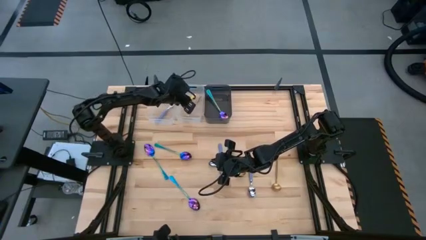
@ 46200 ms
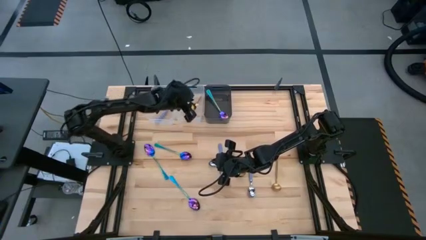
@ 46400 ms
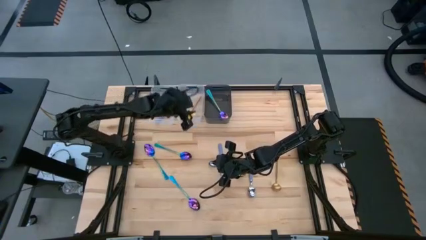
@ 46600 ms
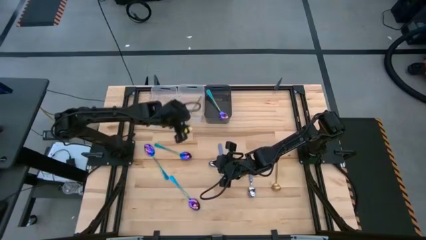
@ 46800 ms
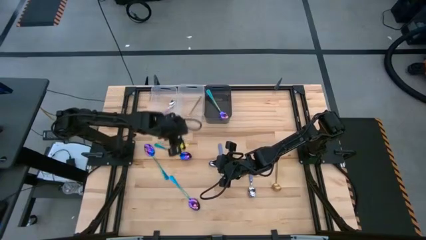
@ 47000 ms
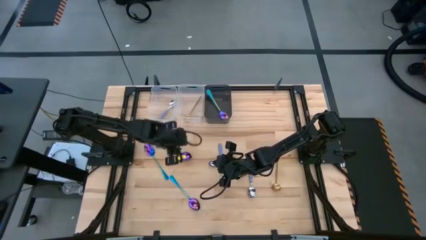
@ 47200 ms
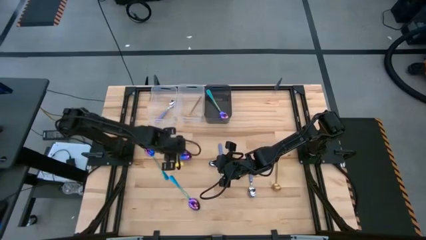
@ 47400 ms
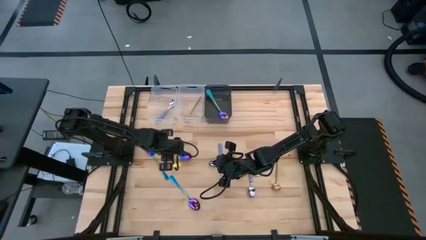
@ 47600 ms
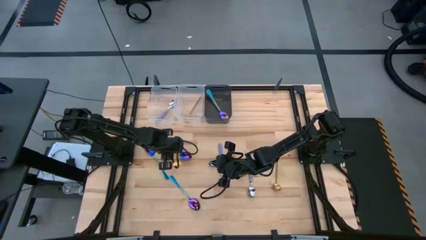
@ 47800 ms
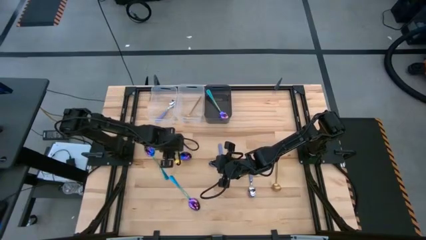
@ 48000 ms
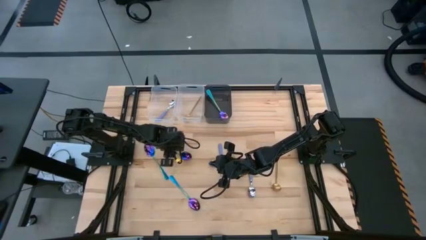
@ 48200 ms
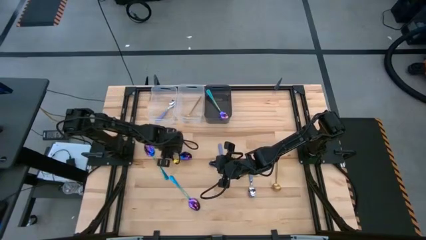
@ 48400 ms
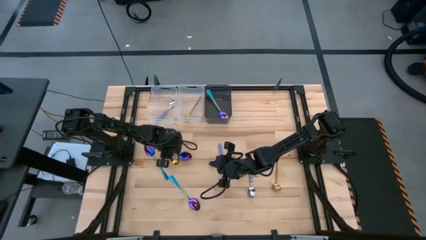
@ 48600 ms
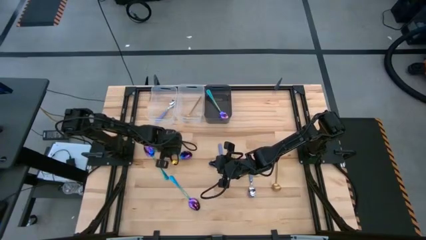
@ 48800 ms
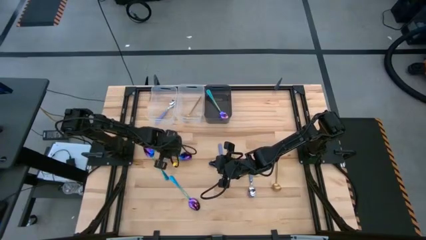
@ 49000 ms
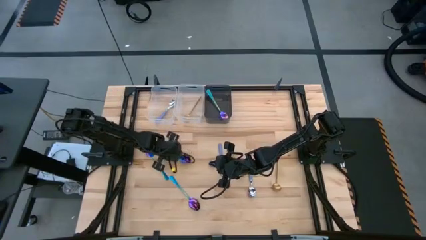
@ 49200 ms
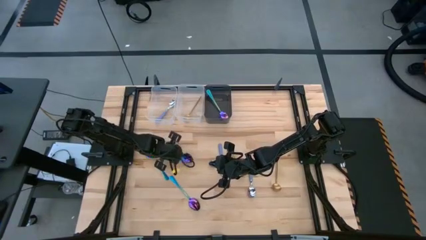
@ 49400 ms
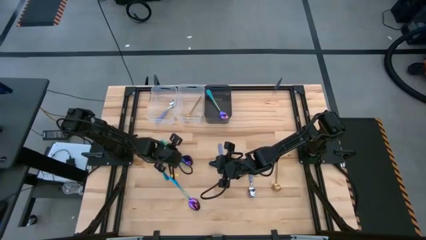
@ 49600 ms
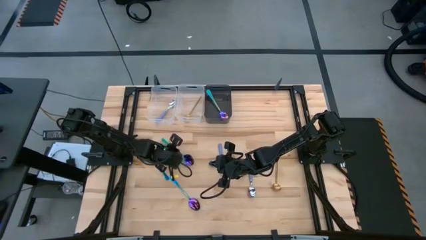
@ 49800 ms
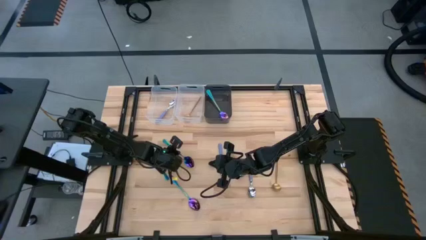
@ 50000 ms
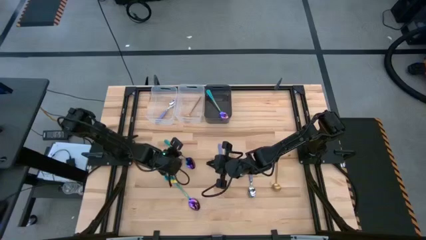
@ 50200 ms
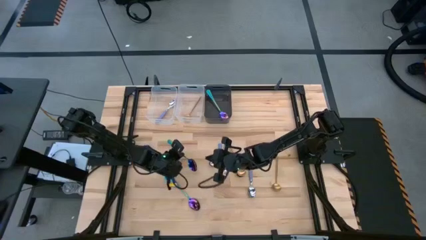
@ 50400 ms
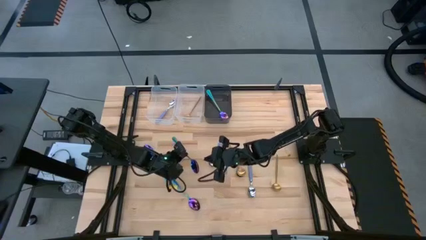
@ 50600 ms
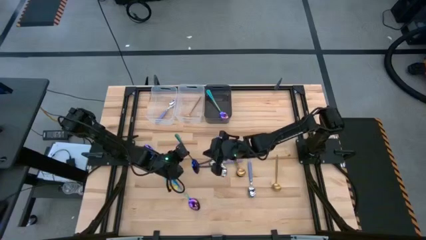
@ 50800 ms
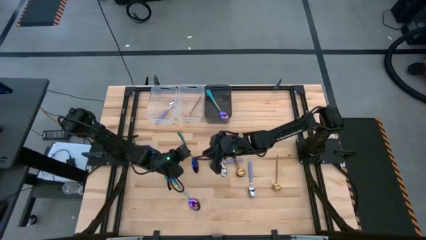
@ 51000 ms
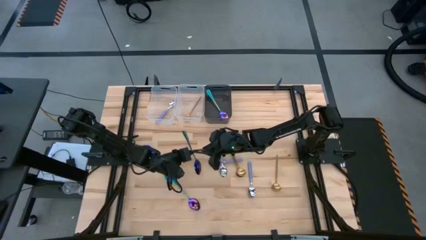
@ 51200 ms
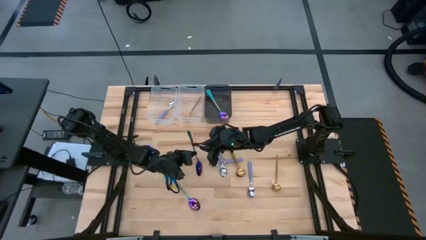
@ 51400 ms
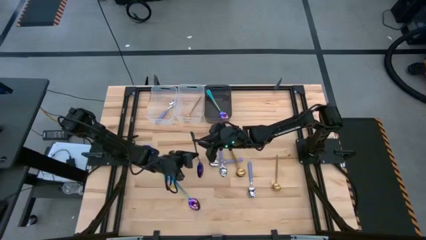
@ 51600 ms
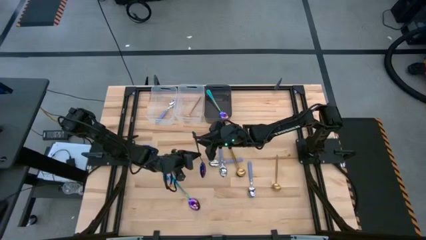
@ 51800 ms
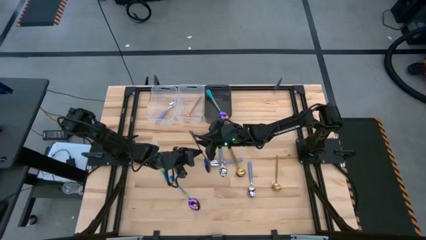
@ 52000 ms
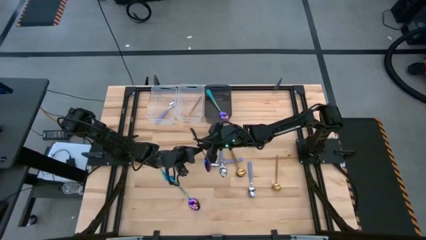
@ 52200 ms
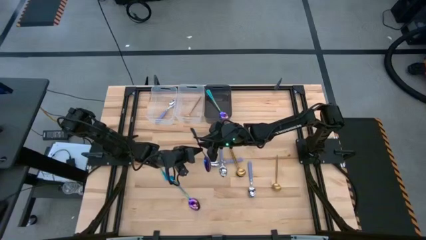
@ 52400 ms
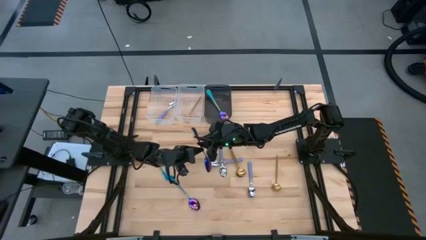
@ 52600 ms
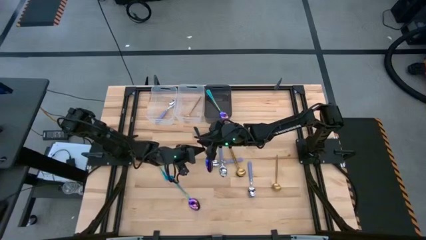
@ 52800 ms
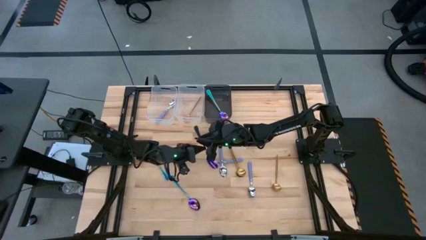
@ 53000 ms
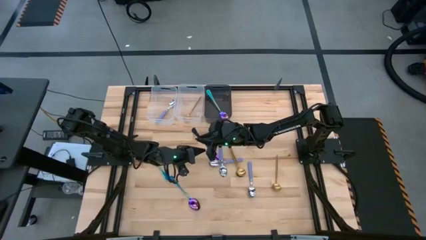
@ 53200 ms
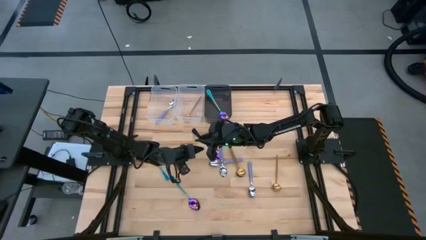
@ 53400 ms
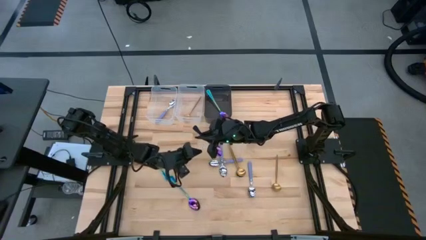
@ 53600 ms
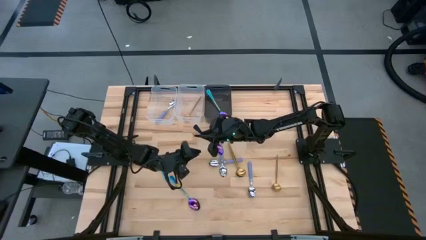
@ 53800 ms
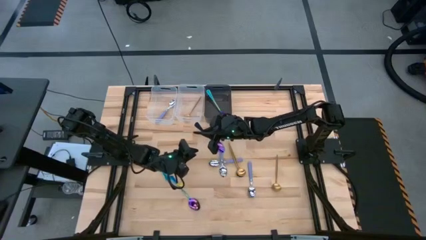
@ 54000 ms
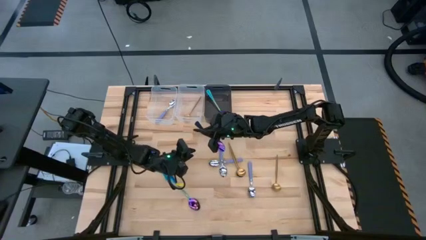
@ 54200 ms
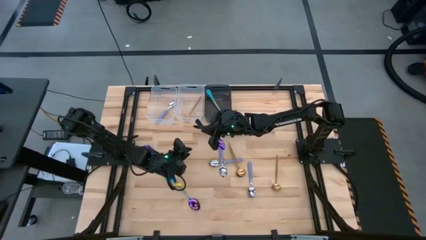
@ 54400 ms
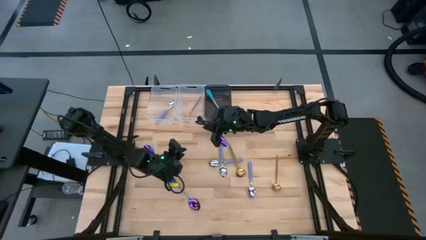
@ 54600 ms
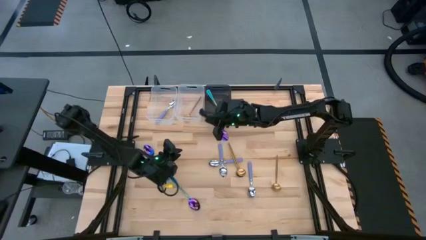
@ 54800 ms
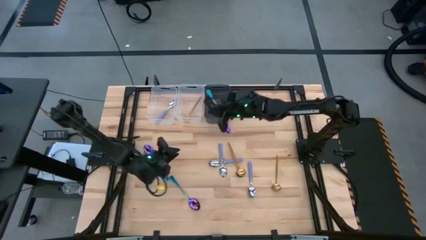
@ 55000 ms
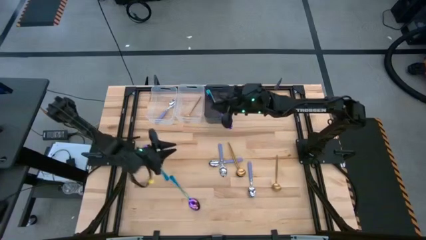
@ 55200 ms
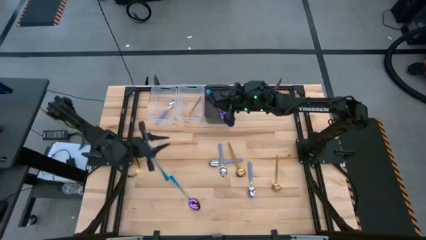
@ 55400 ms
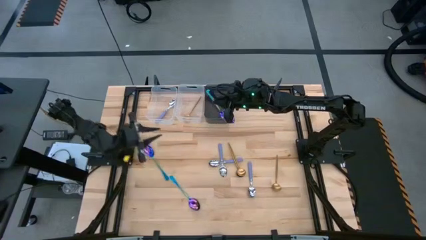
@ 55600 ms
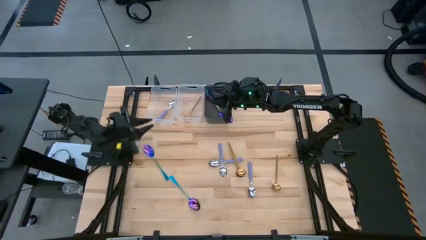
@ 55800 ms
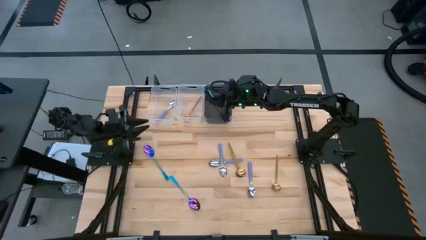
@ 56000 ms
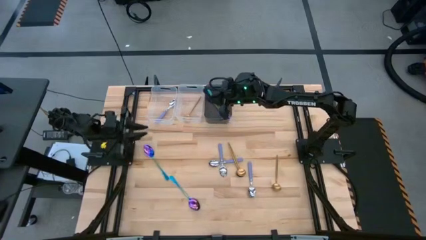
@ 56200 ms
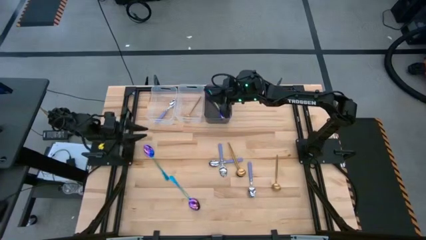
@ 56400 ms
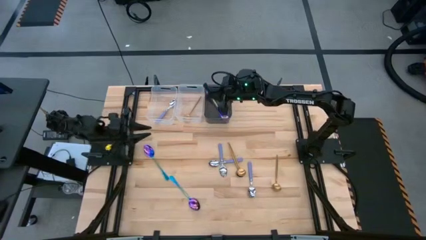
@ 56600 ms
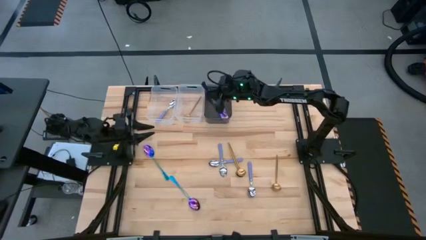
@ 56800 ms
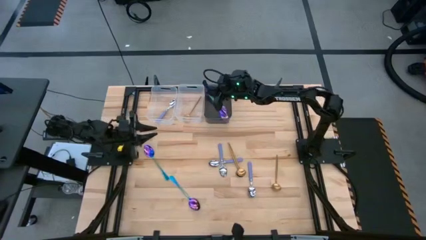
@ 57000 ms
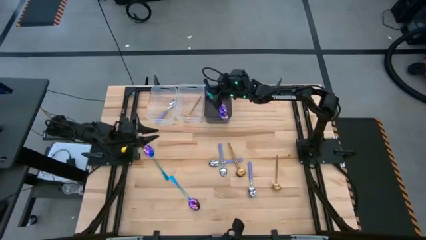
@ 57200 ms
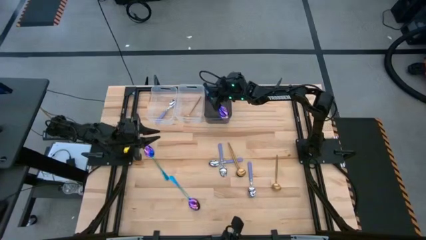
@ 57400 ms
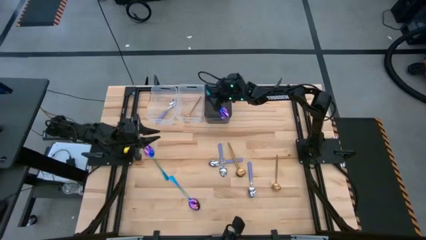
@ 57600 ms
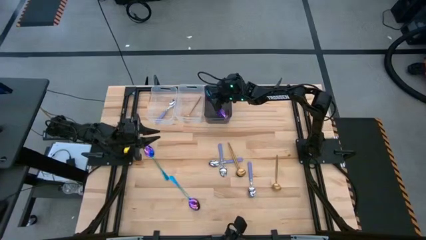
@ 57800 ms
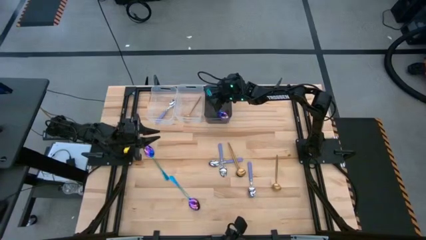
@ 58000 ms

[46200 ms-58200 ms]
Task: Sort silverware by color (type)
Put the iridescent spoon into the black bin

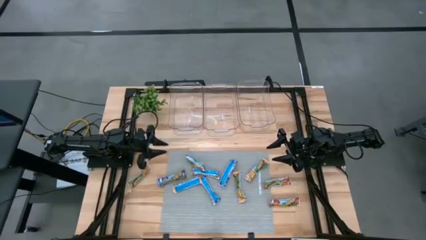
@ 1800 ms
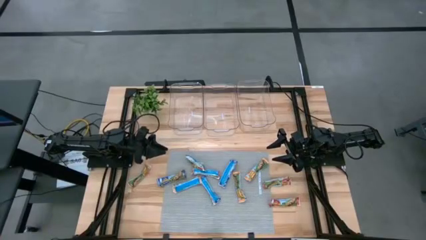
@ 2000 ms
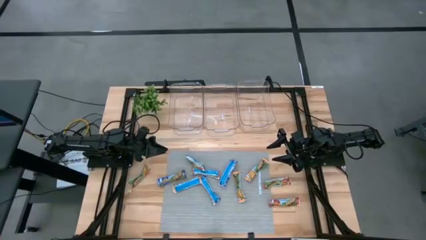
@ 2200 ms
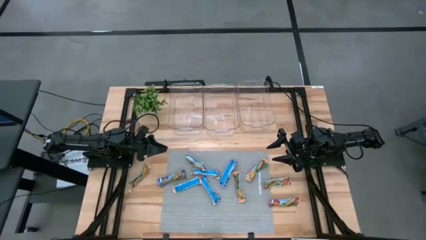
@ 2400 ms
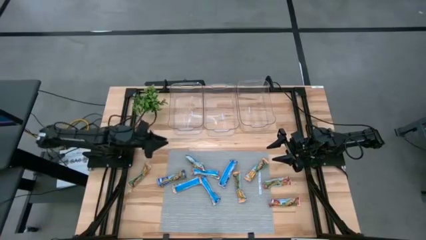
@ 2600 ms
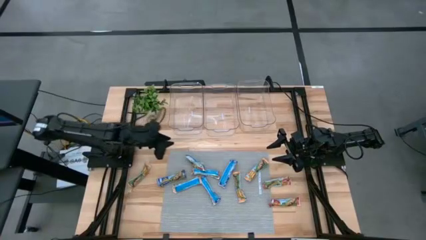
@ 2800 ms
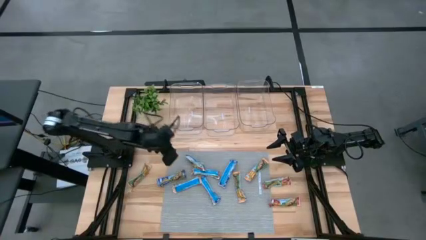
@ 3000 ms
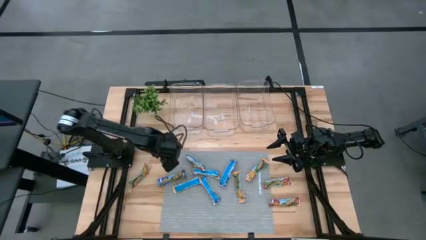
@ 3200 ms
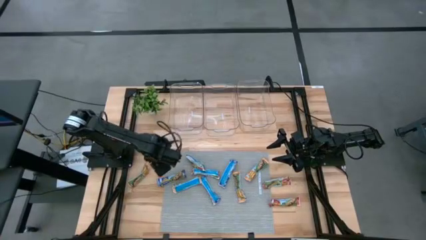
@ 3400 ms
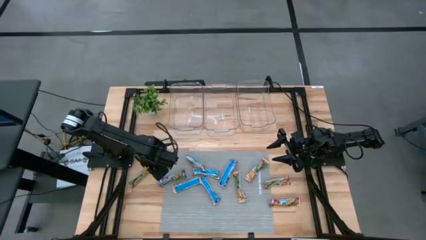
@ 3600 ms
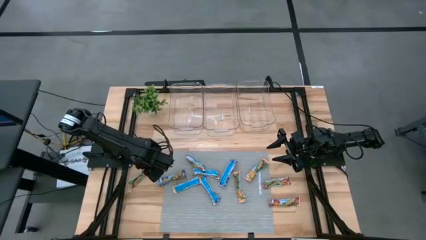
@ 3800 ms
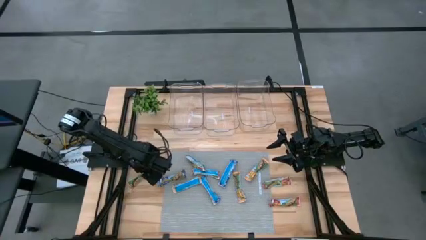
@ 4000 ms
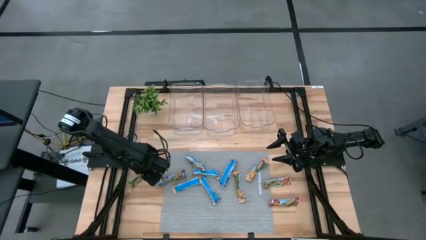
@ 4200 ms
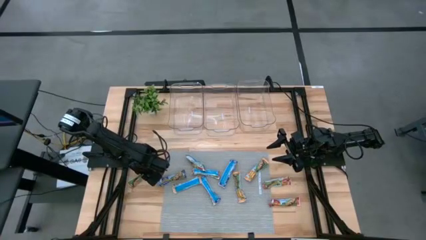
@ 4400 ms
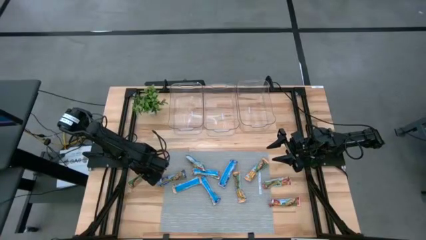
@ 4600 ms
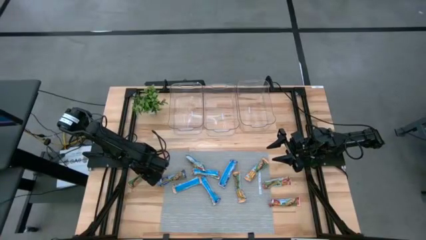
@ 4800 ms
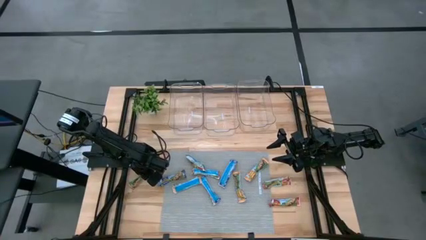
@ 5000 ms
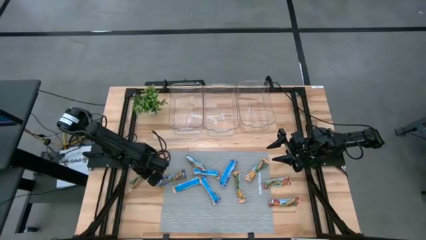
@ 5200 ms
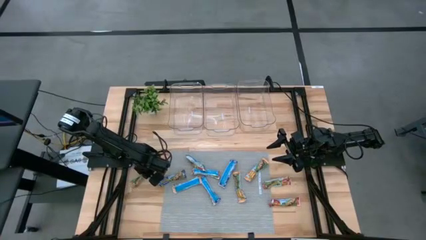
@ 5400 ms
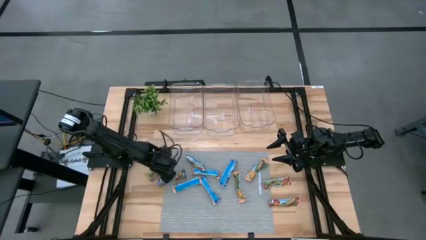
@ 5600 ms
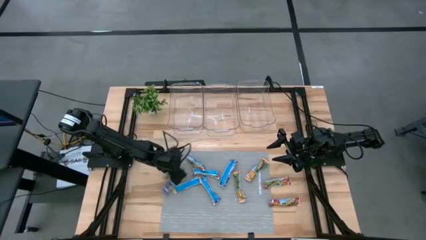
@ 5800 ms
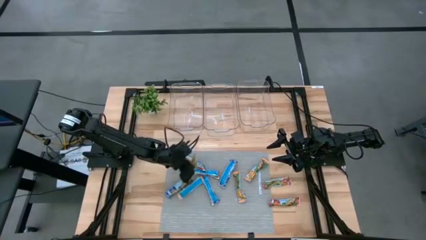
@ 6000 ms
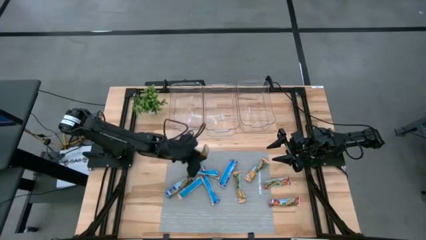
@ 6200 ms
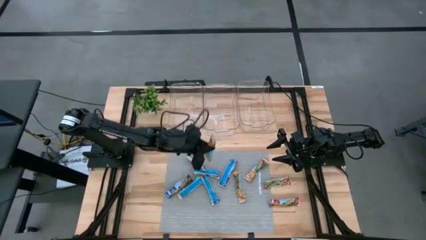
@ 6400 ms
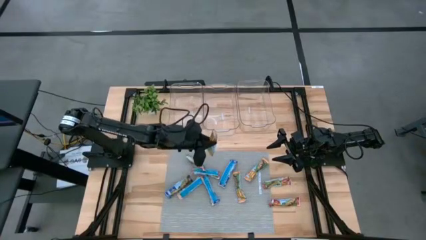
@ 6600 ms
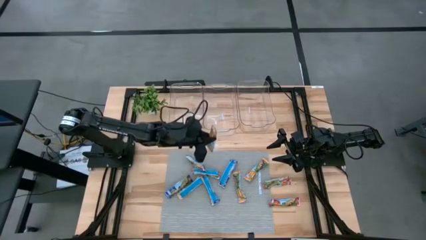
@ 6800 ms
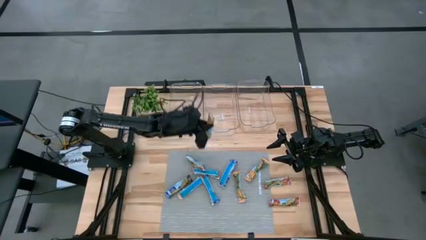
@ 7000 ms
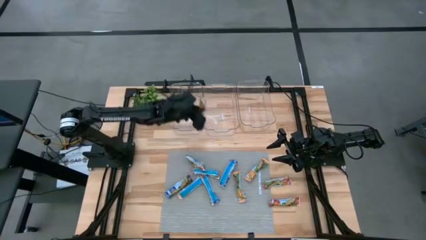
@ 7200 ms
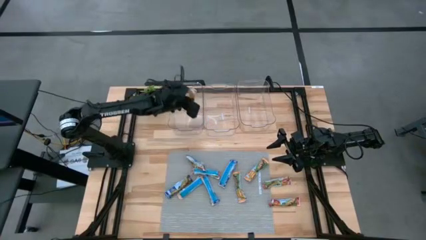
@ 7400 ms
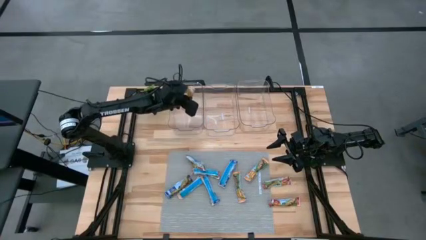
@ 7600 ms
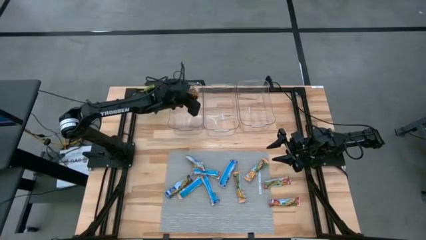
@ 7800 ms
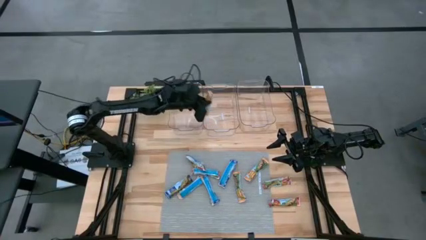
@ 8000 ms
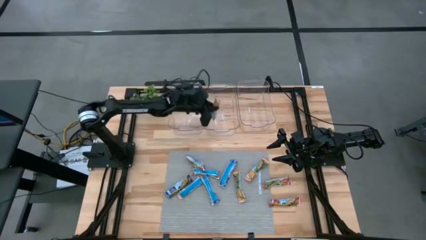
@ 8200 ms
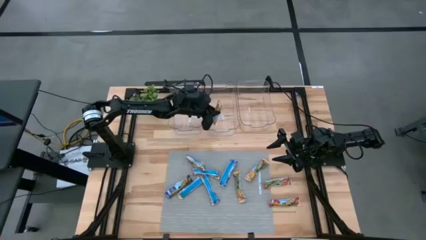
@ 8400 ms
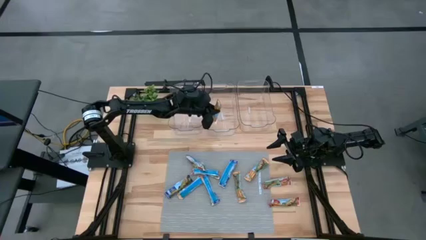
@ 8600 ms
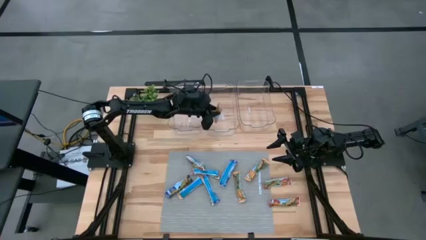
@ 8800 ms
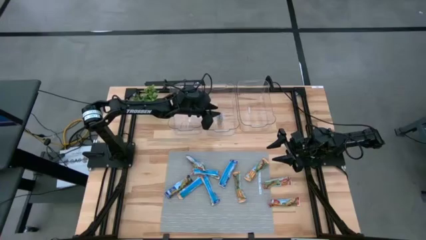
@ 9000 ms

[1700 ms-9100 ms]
Task: Pick and place Granola Bars by type
Put the orange granola bar into the middle transparent bin
